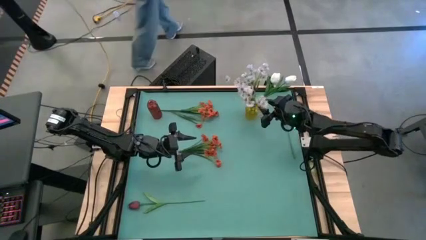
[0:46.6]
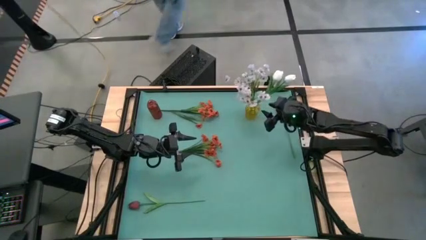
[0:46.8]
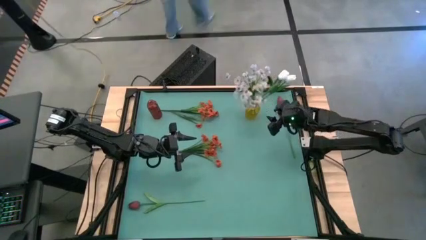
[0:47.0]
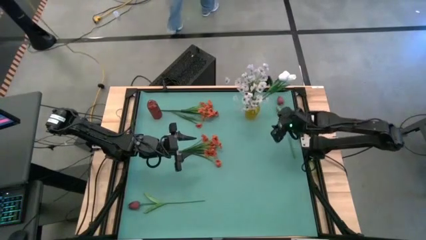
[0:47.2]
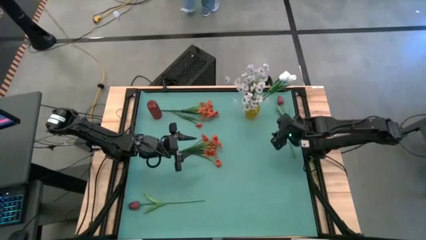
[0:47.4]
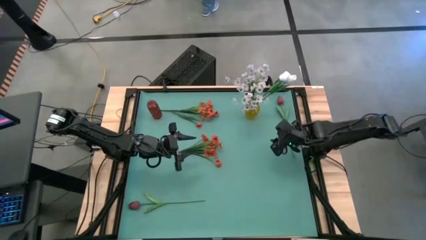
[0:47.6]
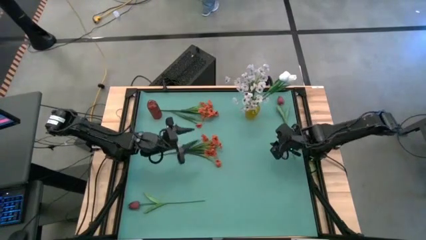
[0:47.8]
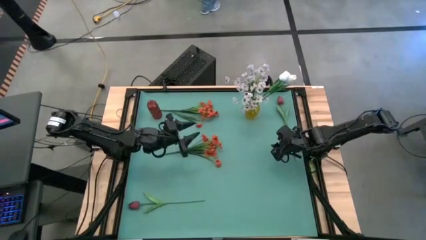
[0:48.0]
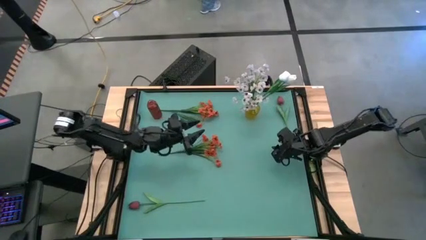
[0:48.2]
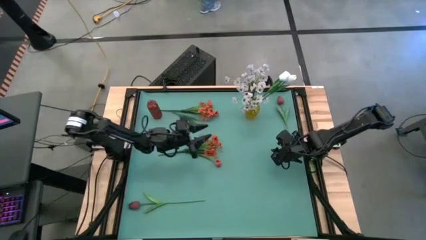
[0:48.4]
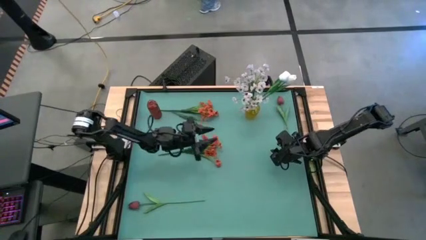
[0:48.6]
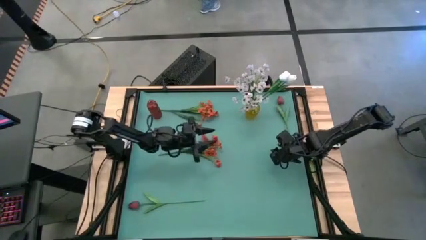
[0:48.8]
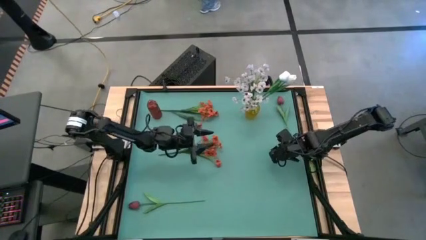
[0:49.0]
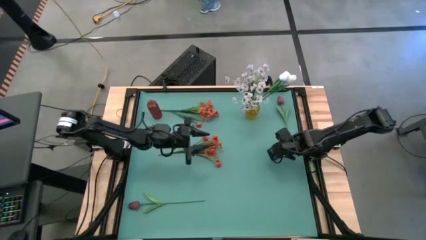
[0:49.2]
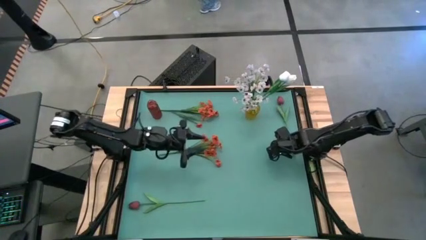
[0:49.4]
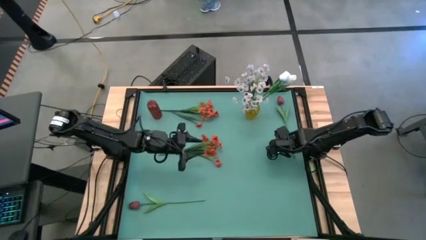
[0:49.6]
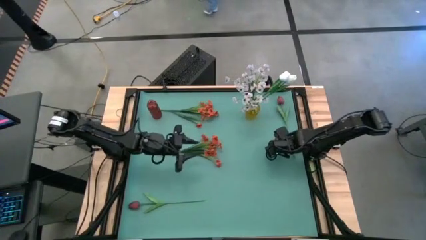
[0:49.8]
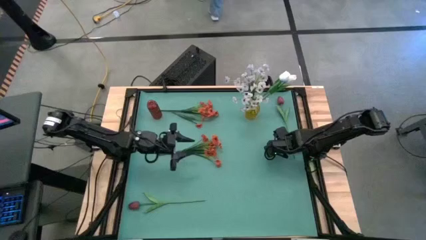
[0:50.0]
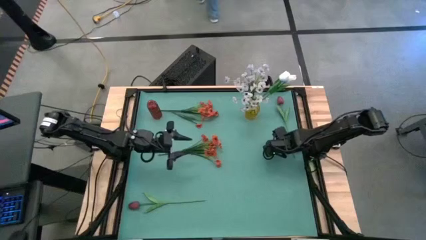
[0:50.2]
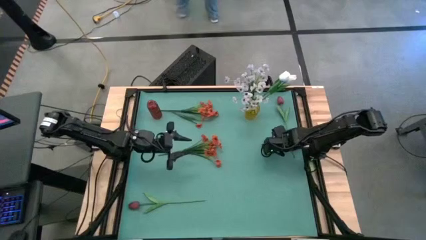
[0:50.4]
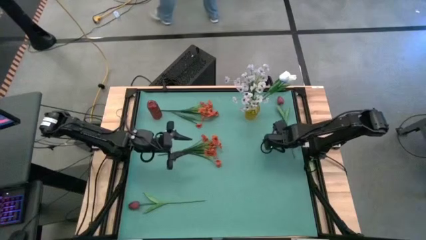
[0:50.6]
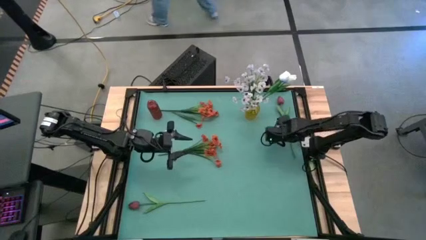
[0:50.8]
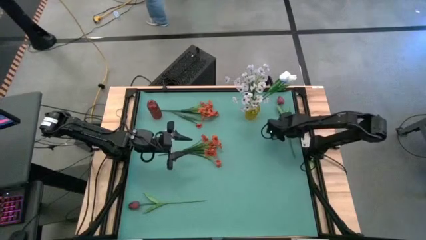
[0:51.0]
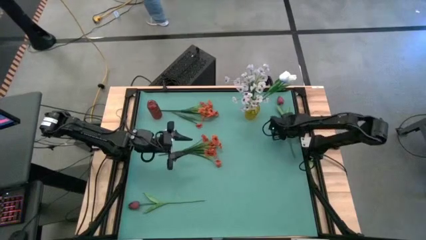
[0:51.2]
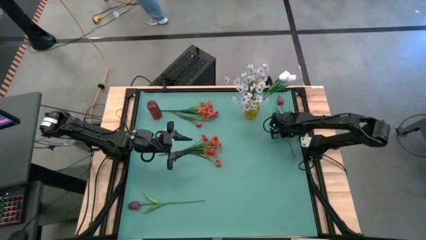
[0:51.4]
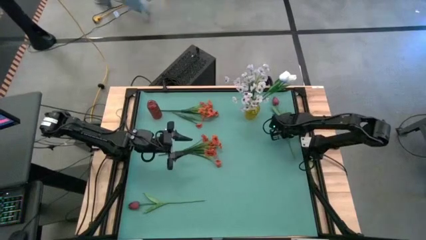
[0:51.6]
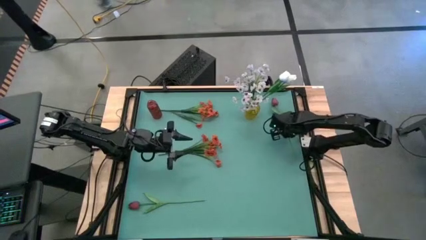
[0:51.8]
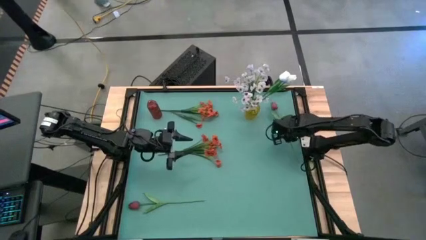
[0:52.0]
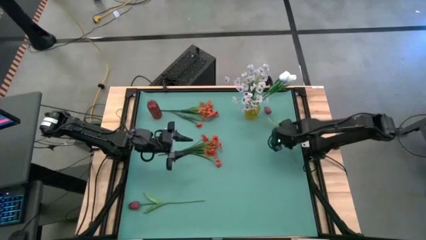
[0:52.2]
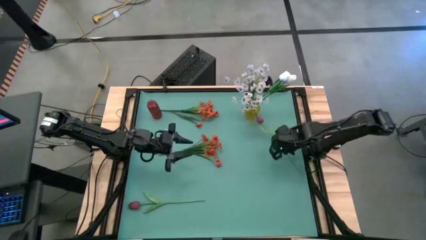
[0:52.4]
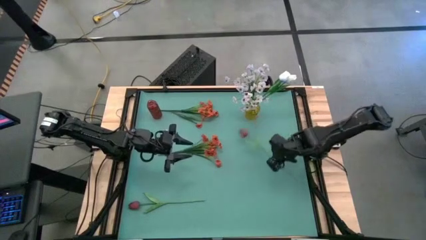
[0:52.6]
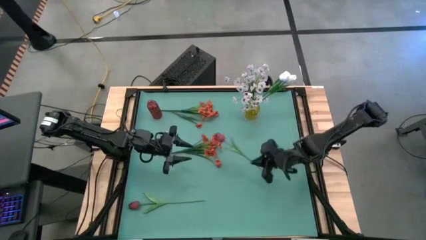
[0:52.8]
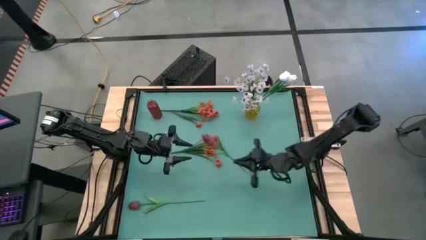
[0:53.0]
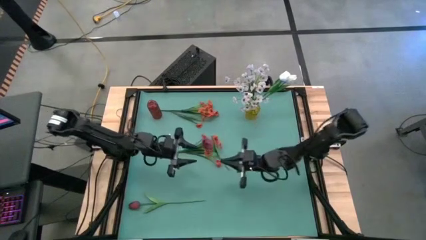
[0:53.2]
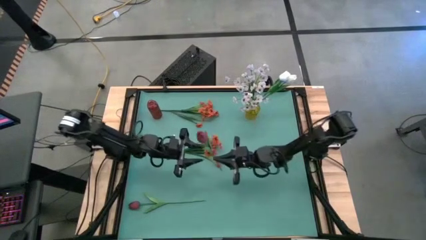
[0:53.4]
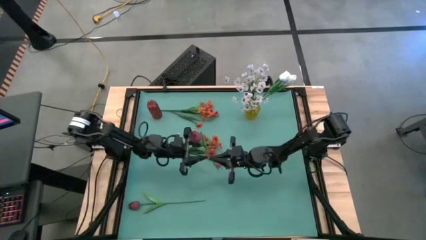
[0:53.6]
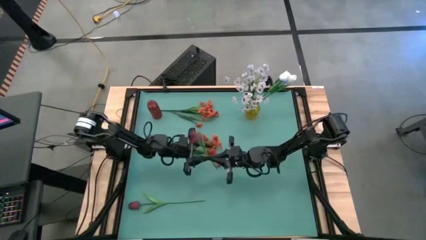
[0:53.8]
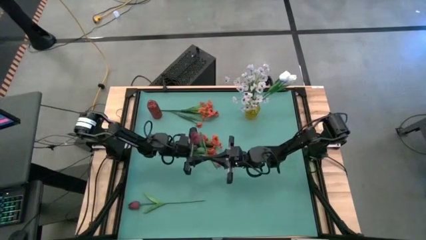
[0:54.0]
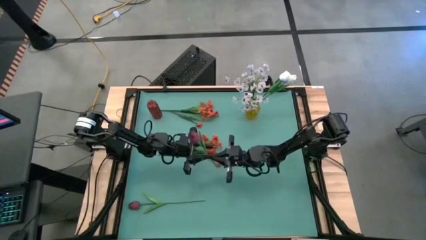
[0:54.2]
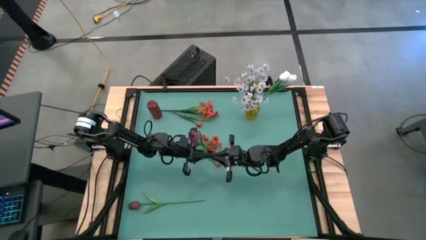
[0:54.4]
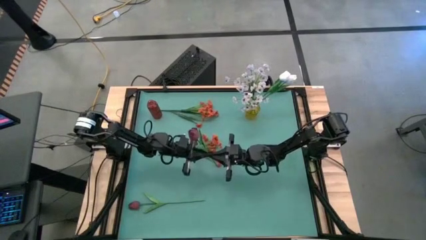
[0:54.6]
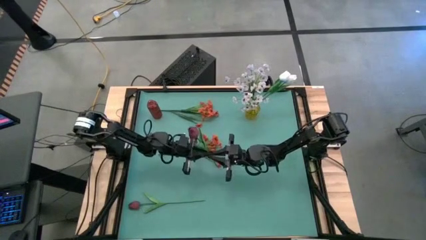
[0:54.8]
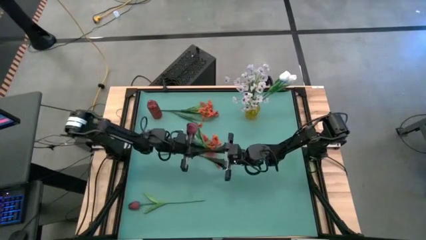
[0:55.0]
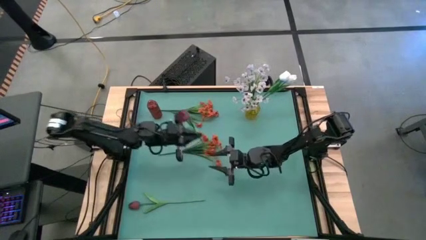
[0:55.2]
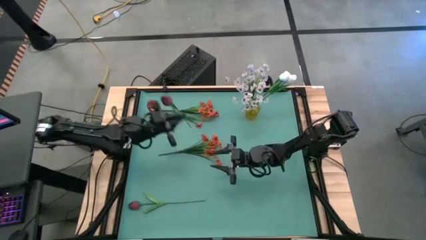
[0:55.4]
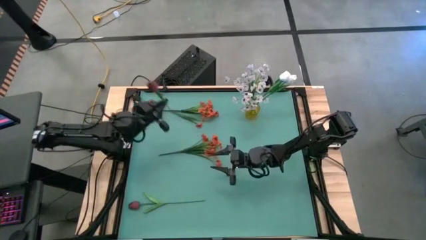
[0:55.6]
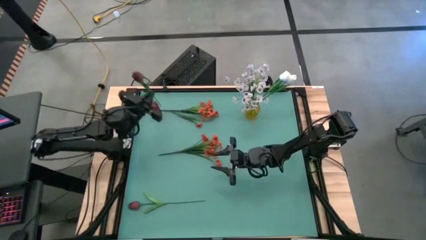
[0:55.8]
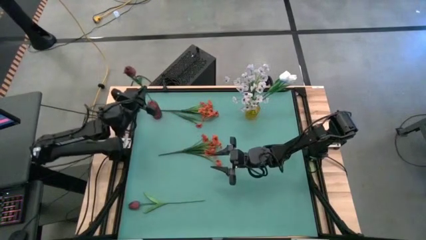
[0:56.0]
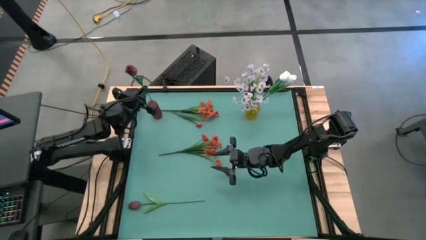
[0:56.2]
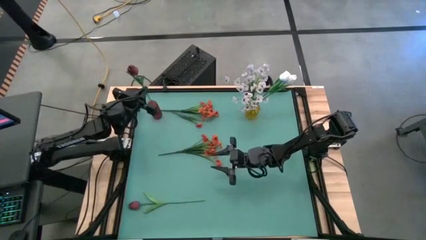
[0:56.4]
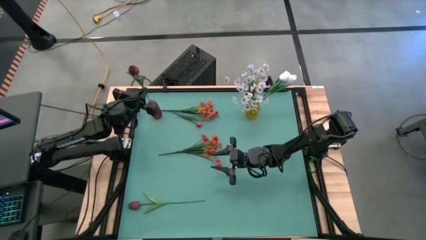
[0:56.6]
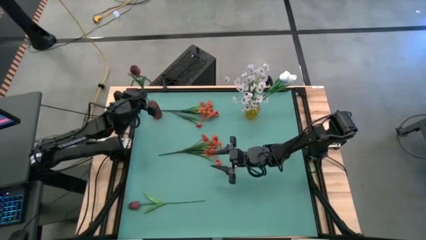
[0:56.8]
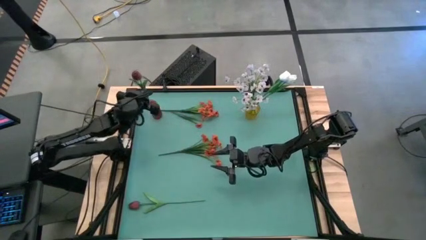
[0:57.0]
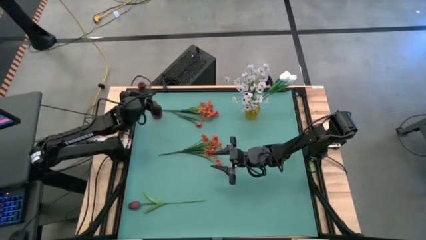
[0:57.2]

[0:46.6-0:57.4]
Task: Sort flowers into vase by color
Put the top red tulip into the red vase

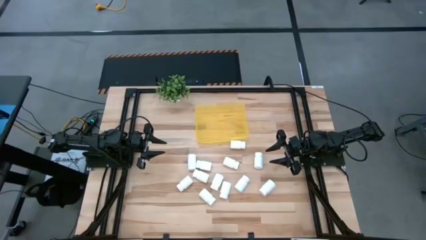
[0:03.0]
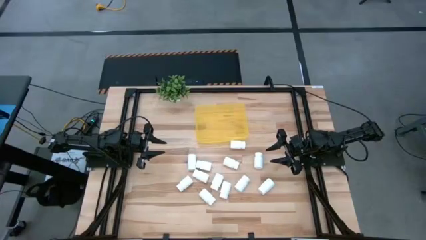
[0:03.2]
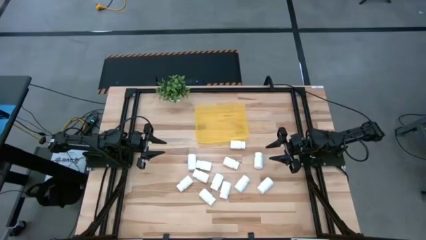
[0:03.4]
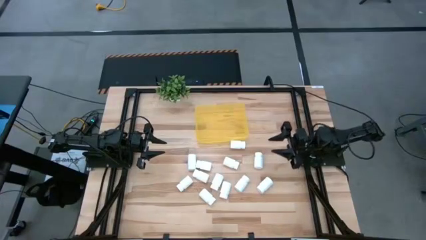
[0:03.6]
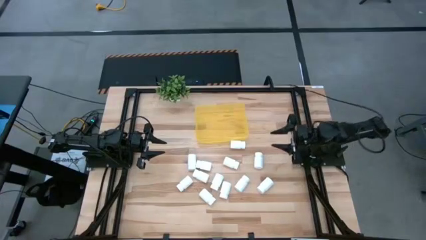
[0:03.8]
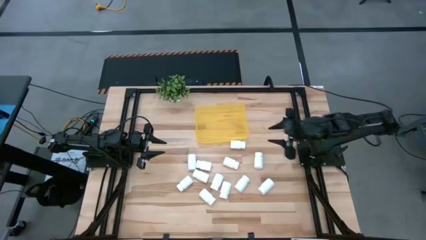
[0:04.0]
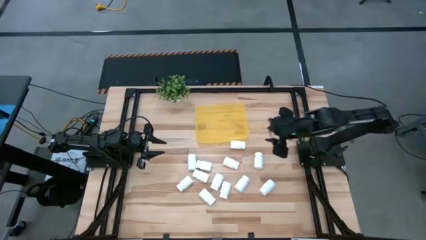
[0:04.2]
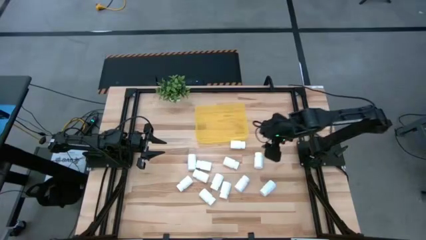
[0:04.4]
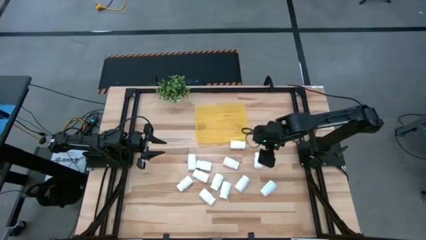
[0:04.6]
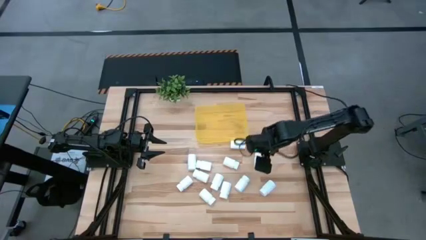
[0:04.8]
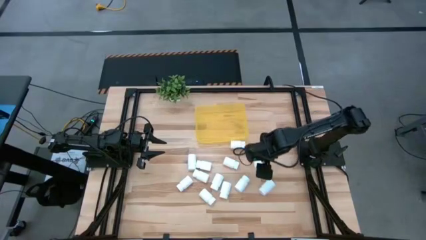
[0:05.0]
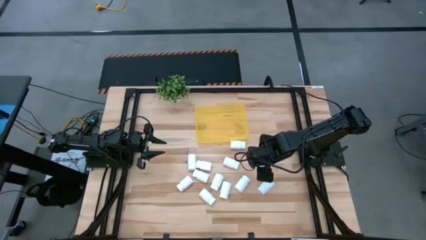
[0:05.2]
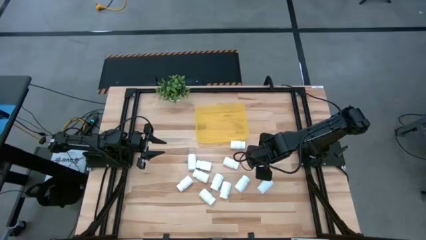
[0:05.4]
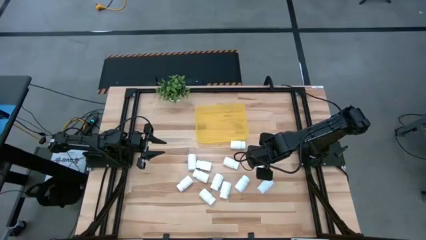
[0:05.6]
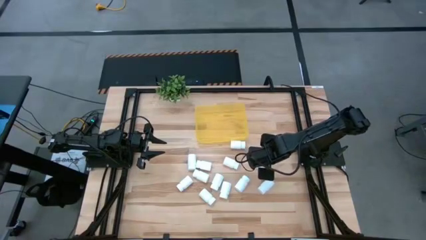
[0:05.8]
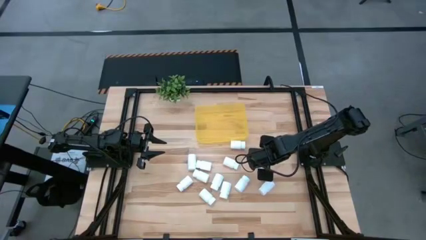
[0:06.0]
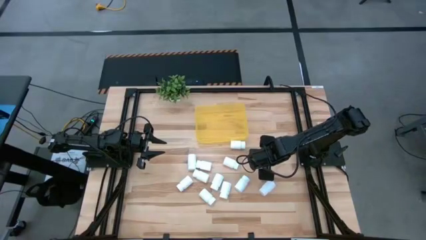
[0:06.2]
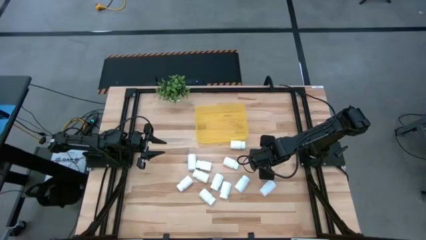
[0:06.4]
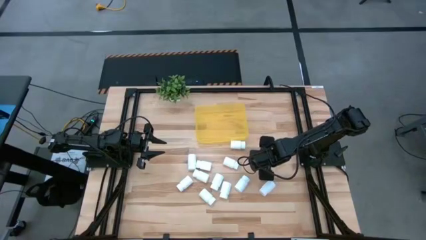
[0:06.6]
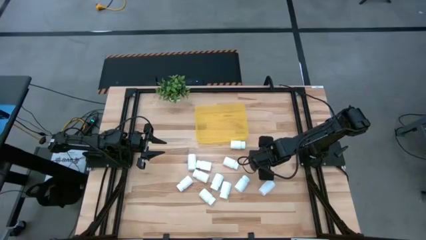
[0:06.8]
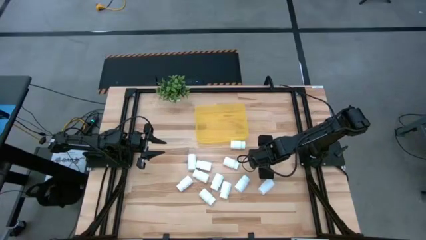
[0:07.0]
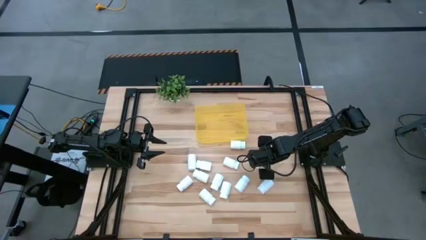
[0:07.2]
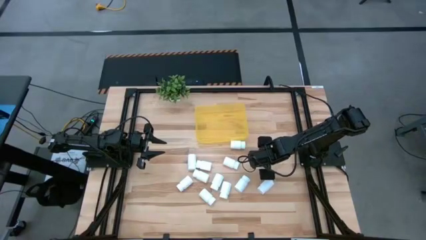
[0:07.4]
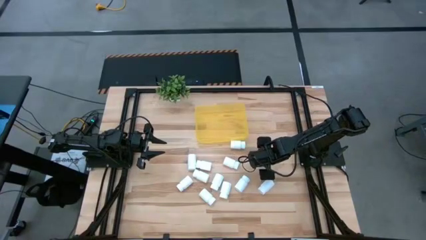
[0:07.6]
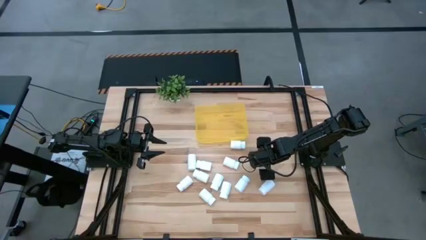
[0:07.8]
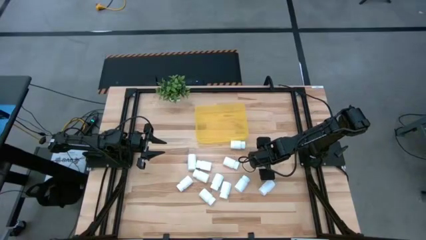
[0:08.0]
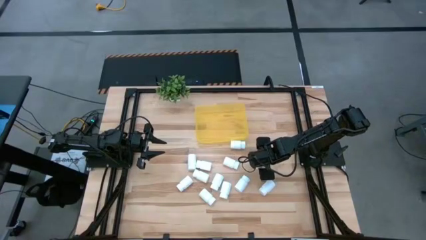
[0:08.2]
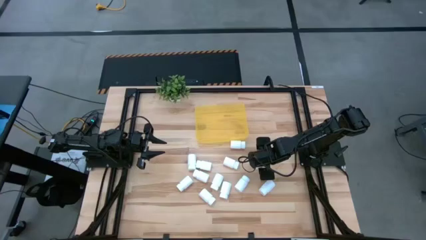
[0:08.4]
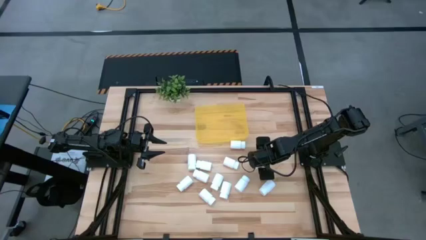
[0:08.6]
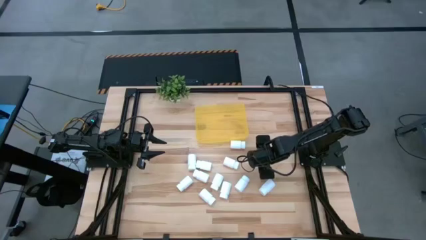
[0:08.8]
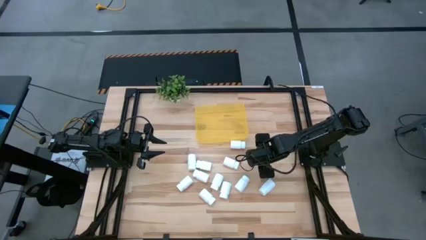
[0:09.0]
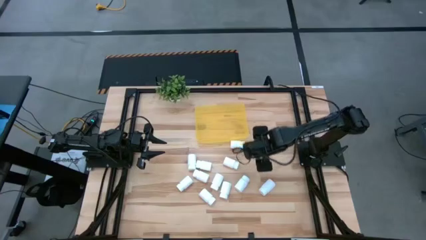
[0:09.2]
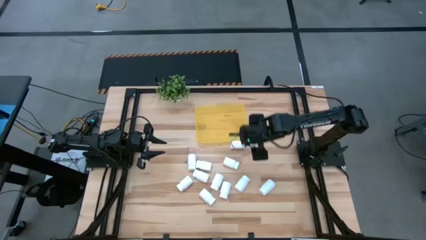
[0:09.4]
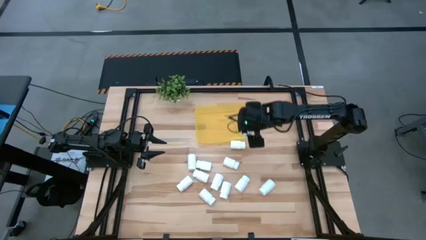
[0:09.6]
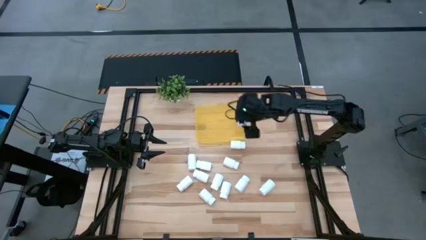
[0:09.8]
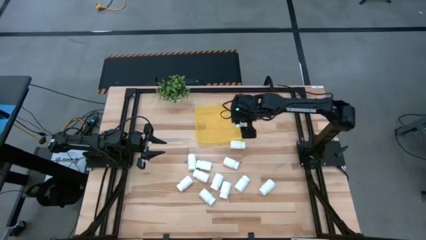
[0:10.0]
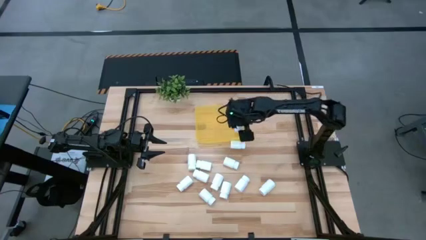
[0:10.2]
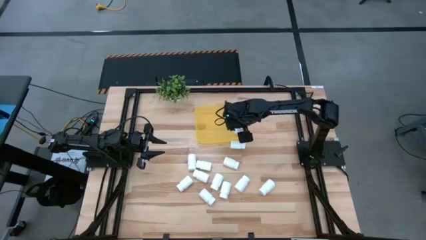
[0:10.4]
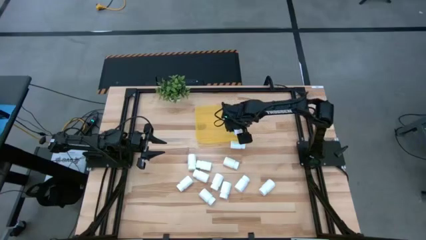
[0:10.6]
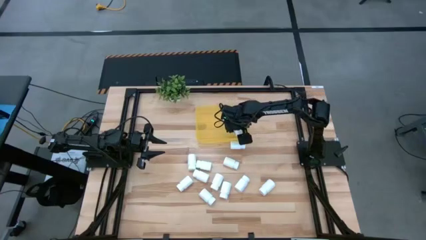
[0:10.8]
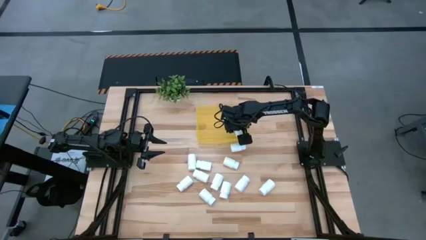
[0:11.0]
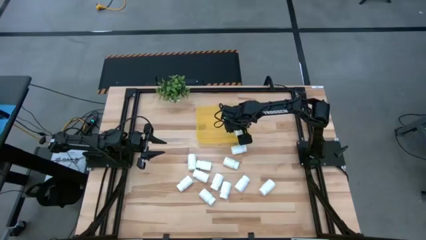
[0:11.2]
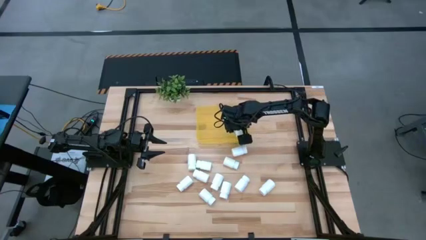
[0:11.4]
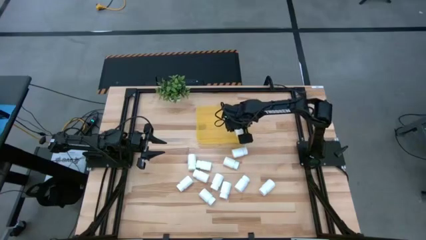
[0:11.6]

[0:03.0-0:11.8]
Task: Pick and place pill bottles into a basket
Put the white pill bottle into the yellow bin
